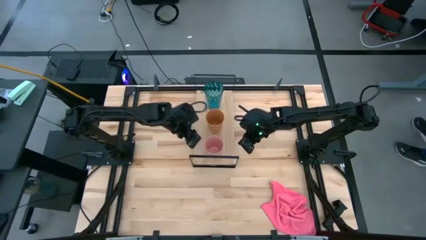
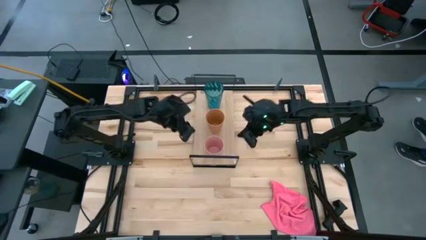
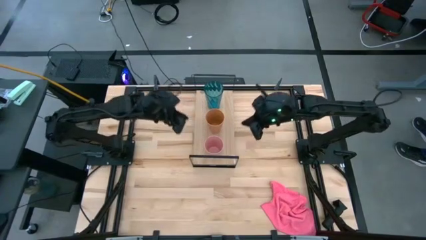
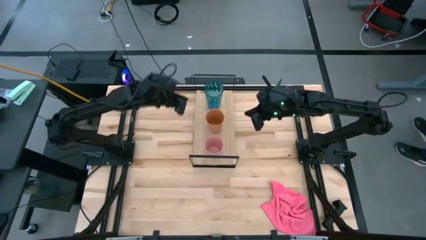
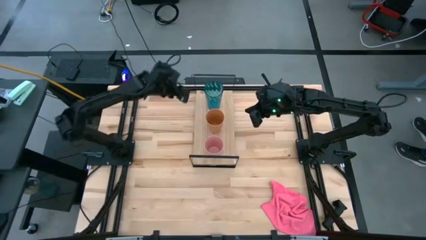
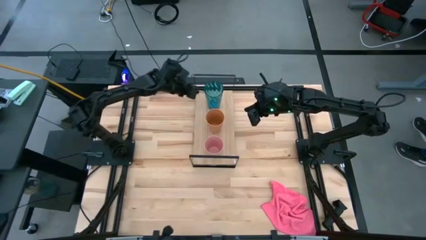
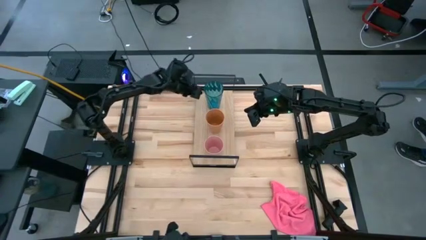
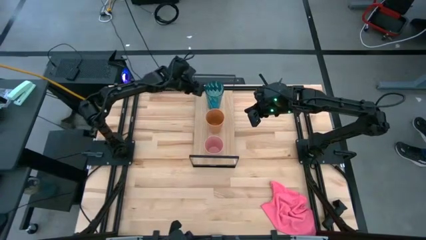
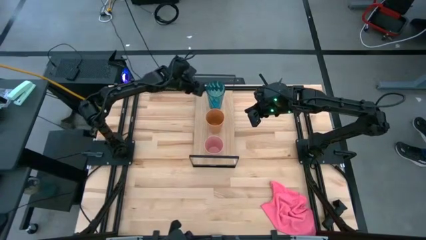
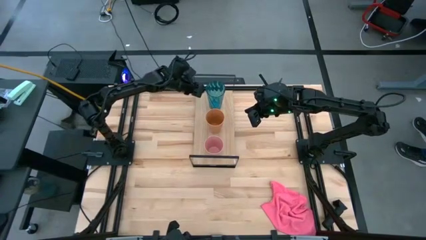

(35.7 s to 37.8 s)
Task: Stack small to large cups/mugs on shelf
Adjust the blue cup

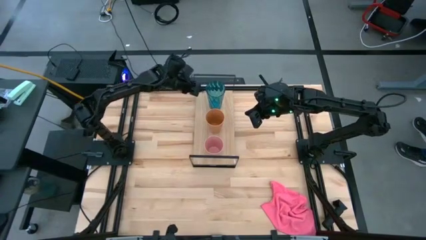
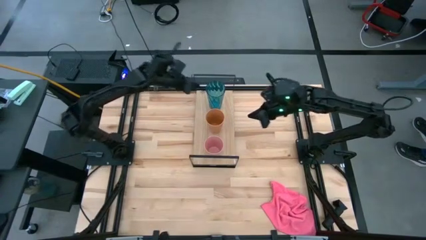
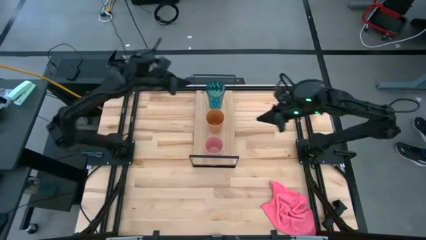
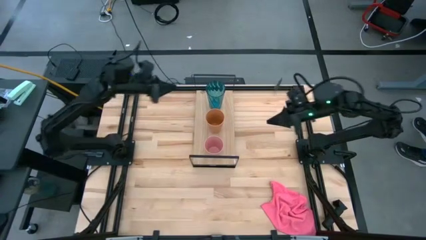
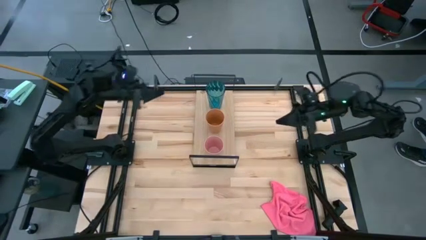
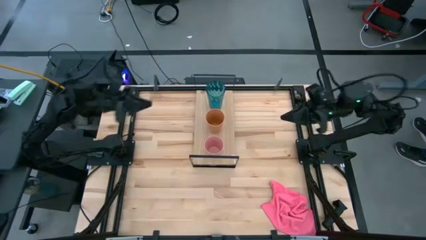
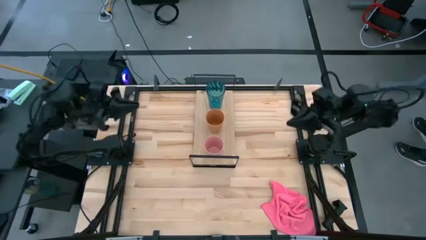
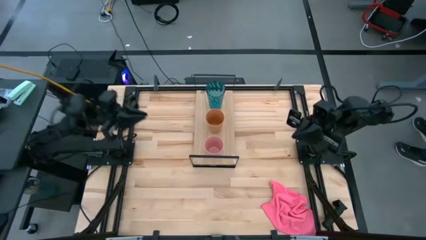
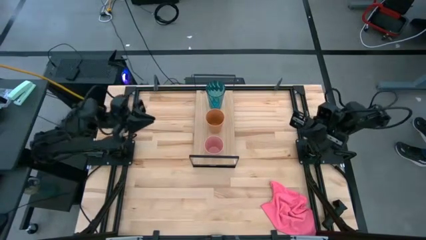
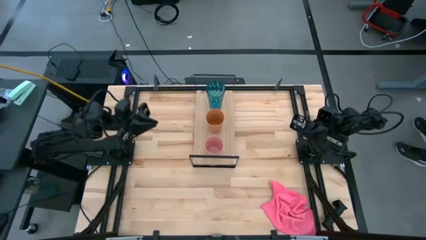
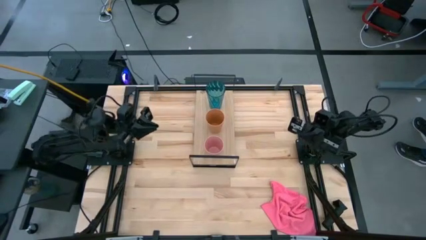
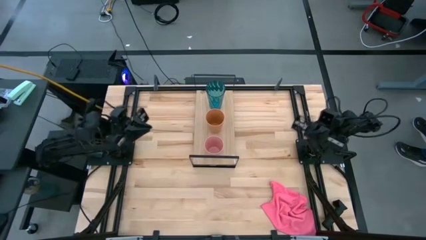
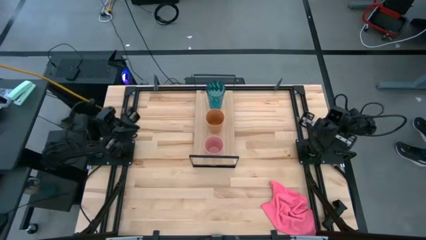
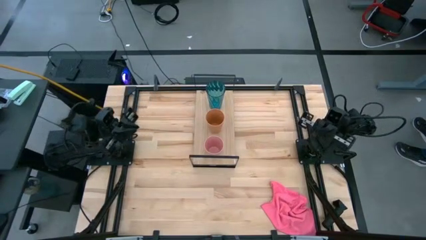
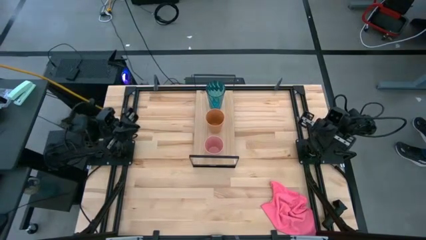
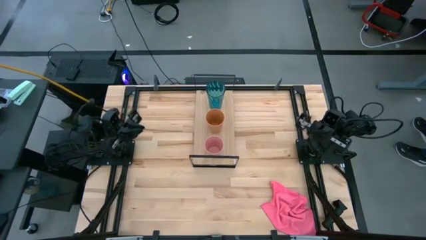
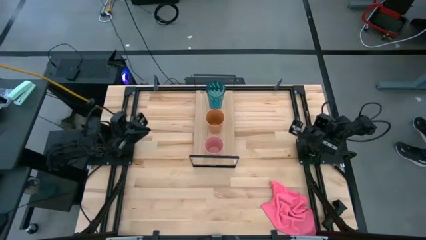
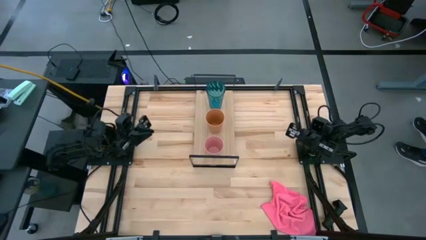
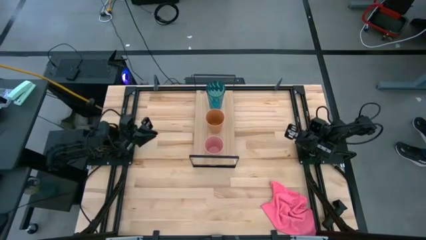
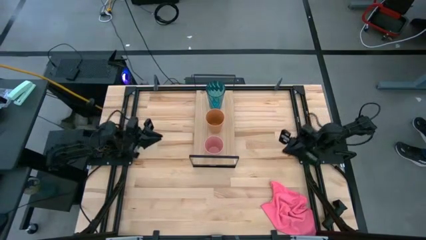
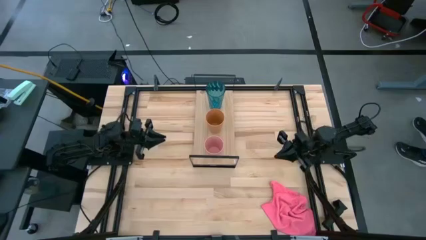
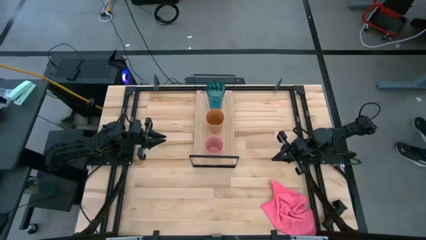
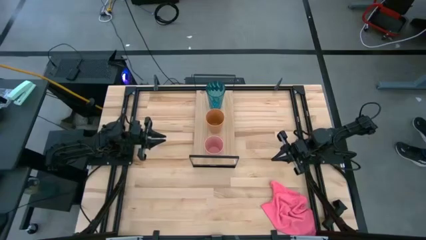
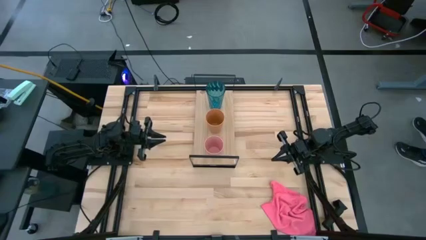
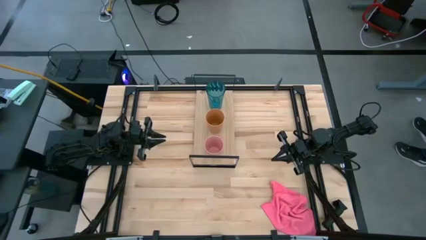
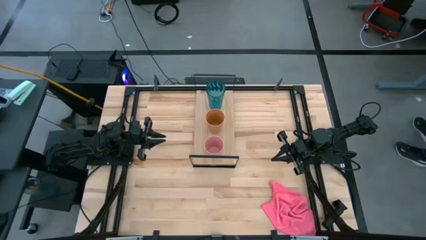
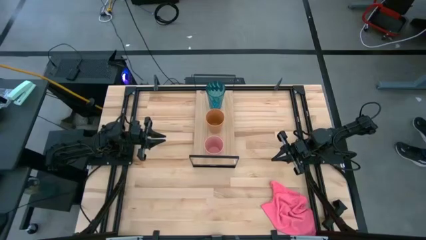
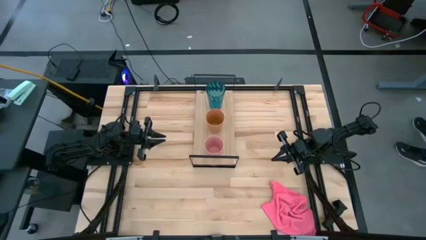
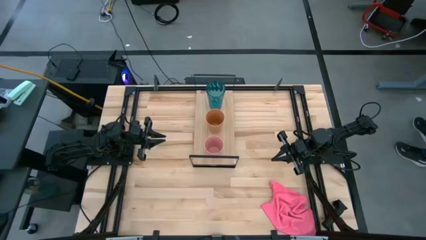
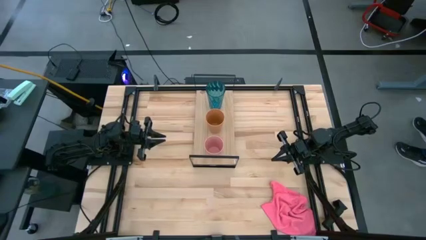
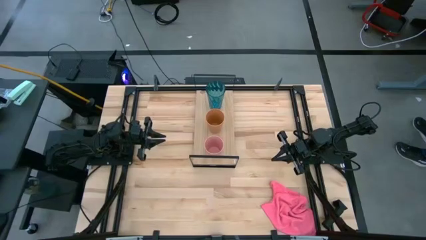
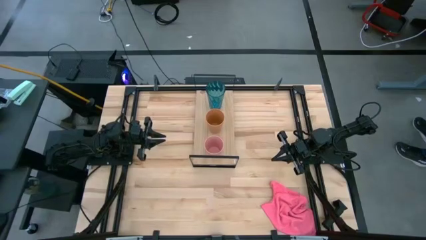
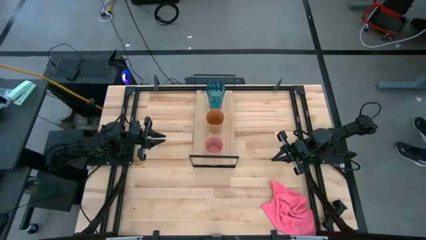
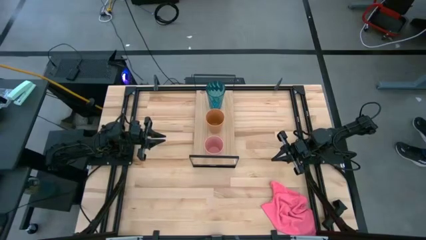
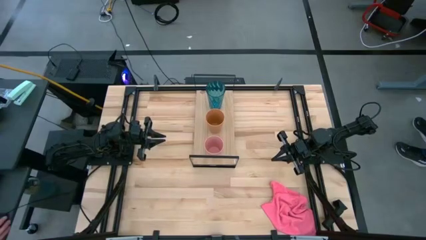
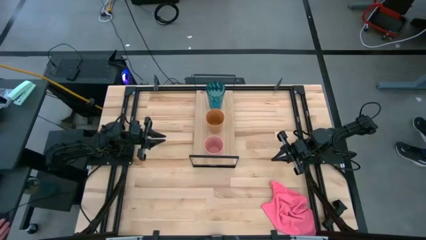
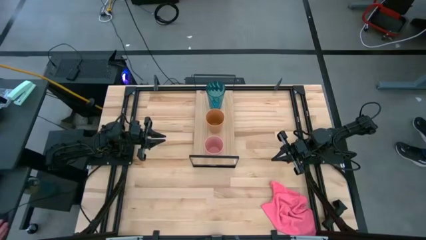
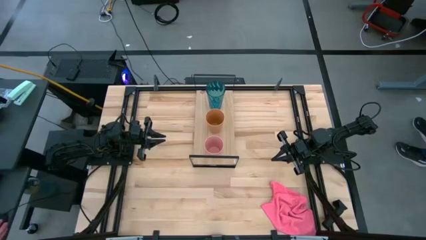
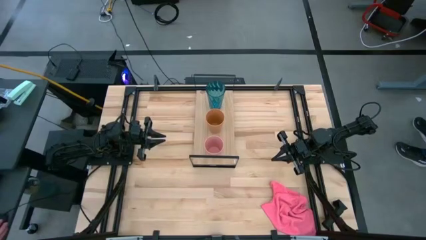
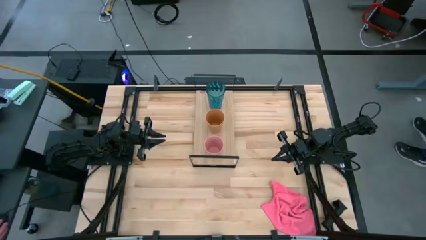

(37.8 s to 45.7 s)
Return to Home Position

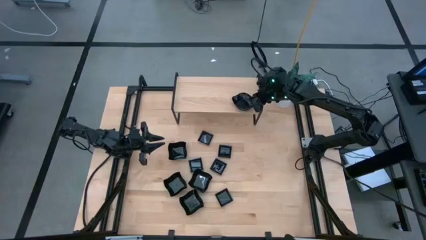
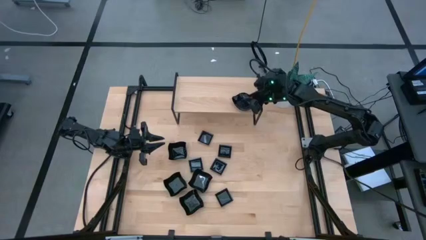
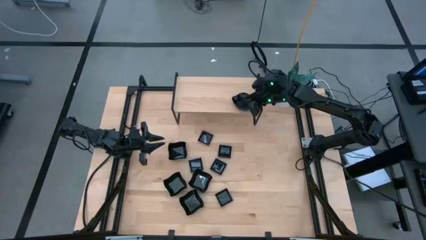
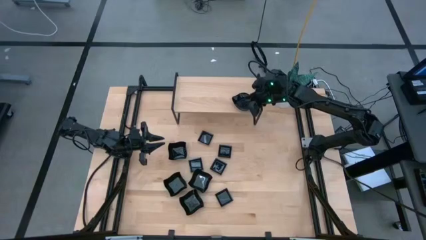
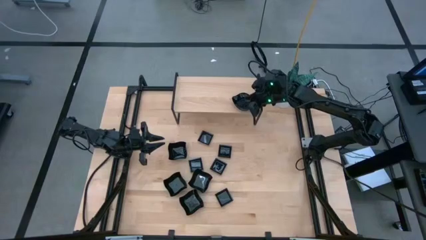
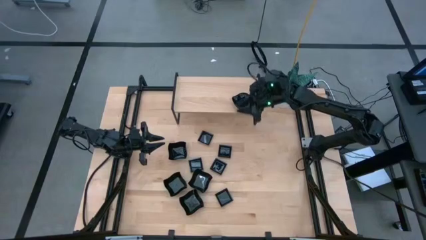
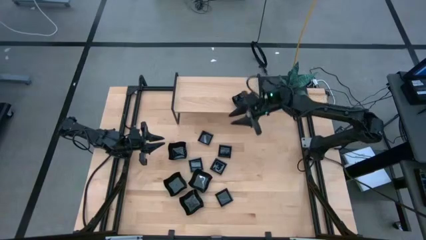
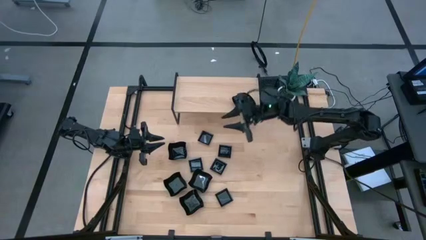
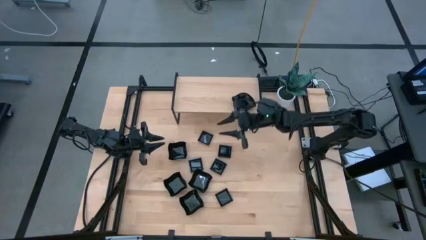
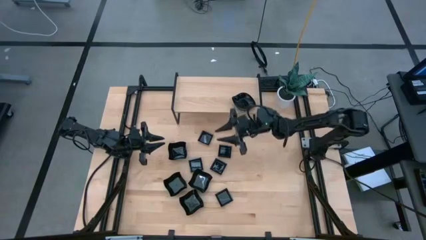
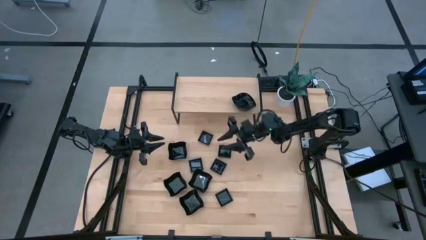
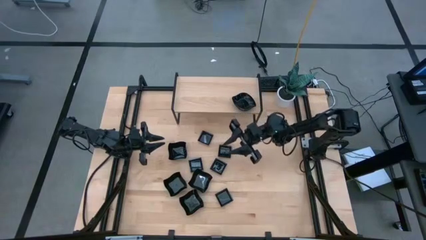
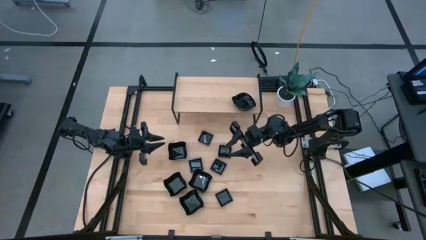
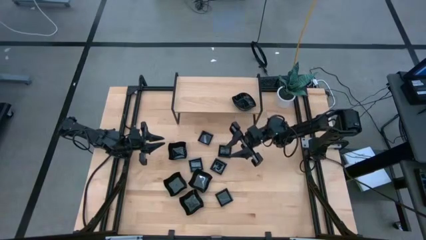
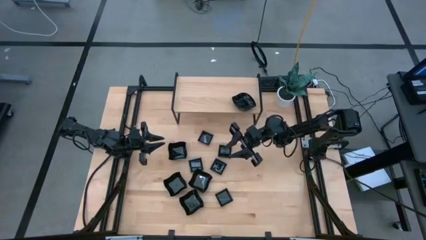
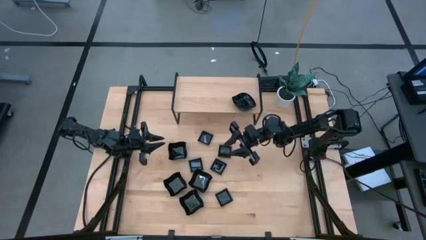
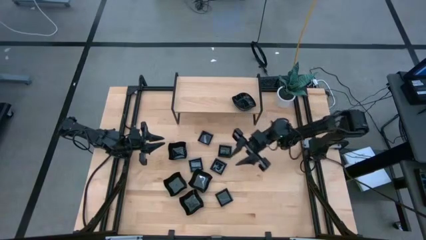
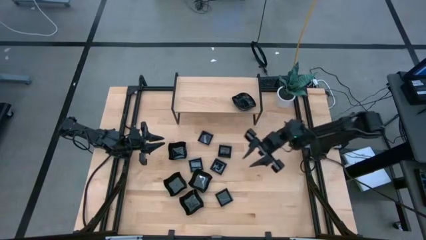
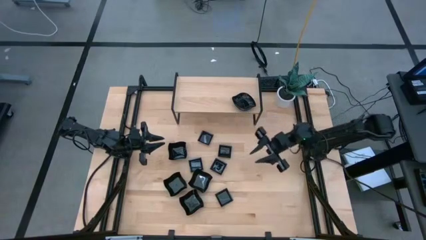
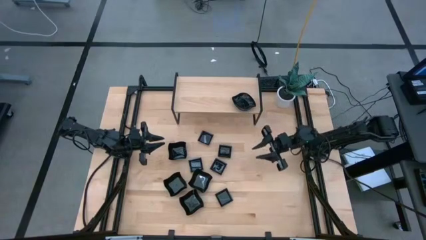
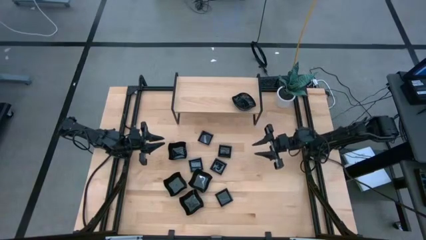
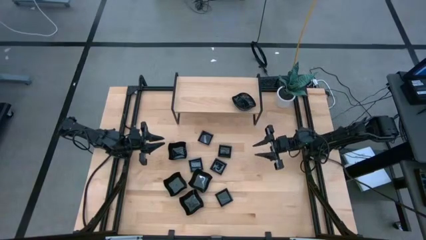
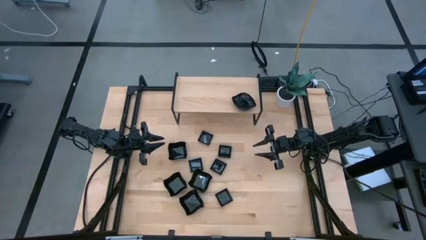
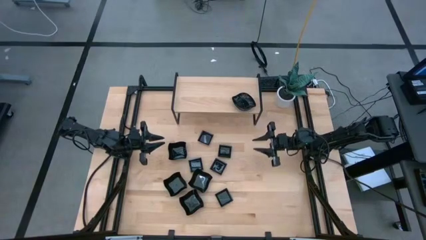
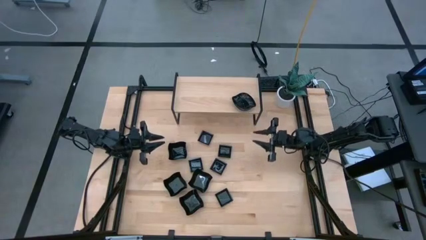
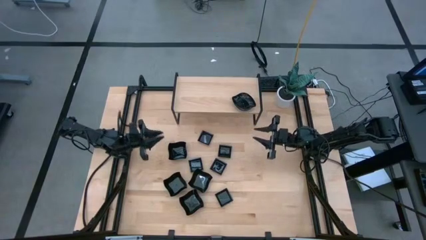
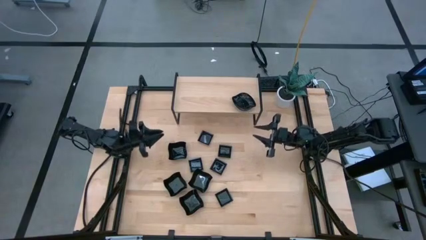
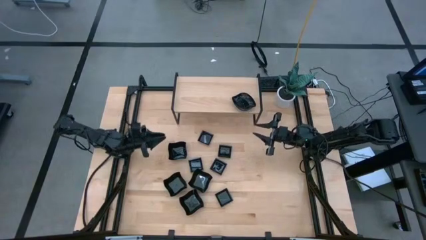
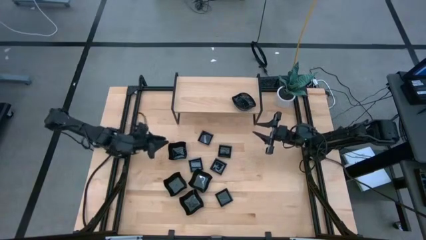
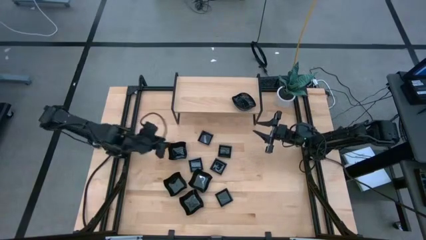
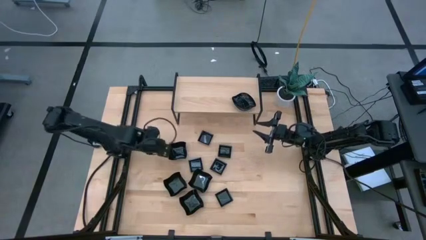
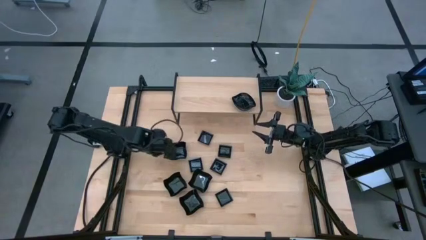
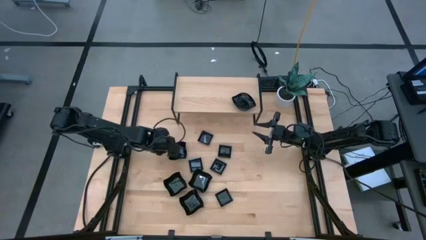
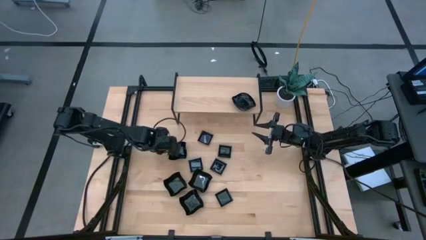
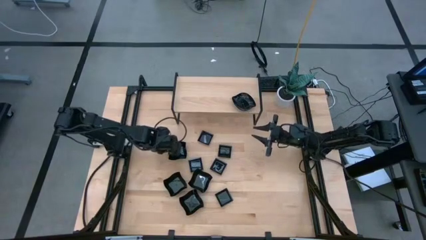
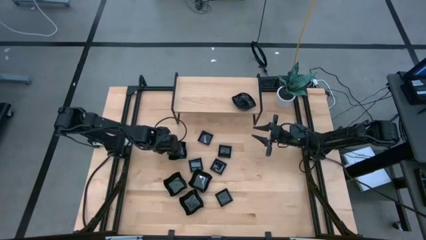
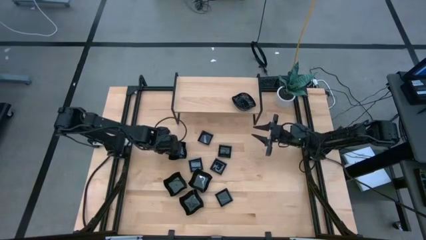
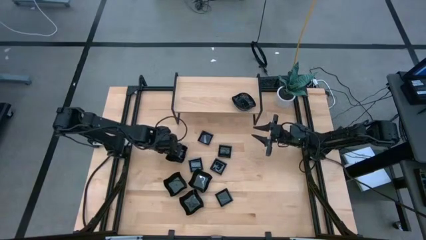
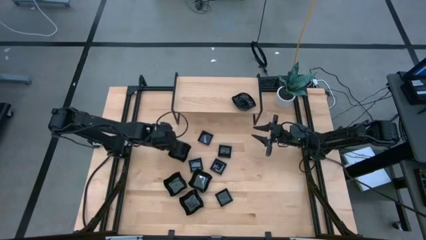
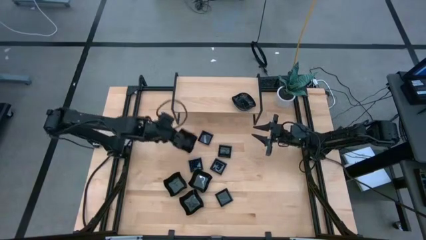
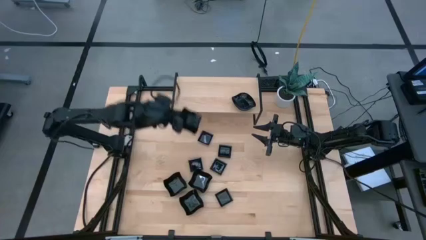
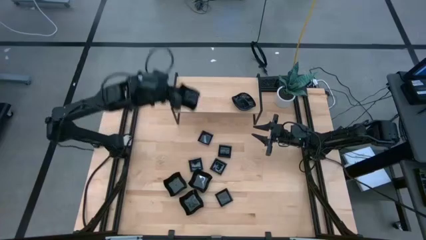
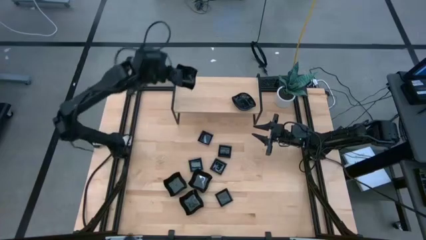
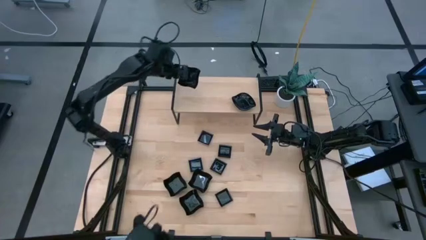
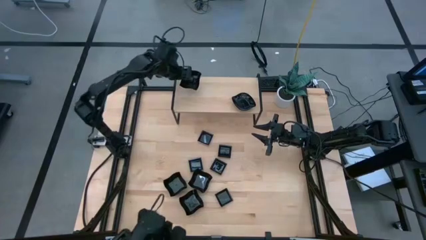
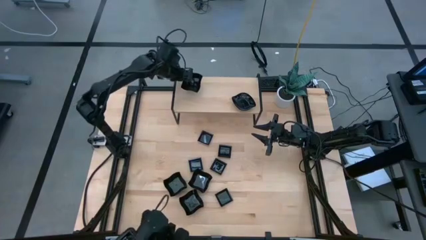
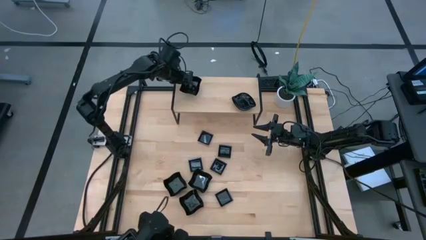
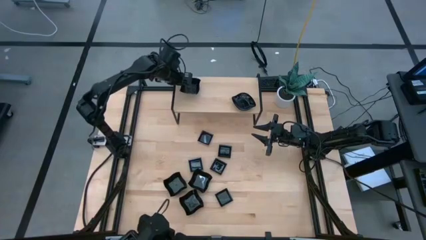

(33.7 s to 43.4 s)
Task: Pick & Place Mini shaped plates
Put the distorted square plate on the shelf
